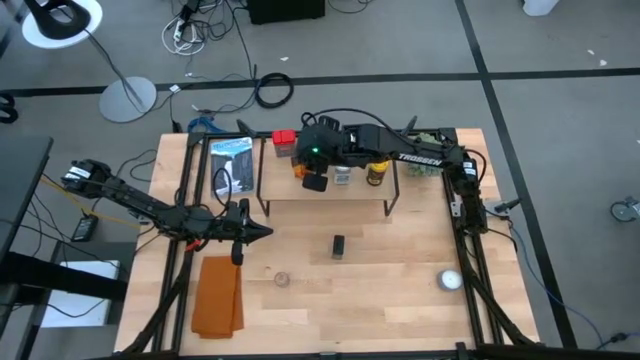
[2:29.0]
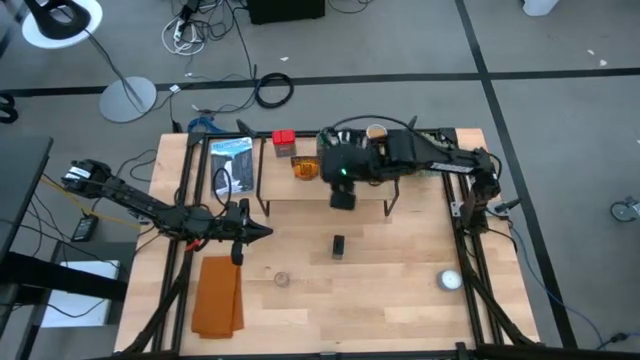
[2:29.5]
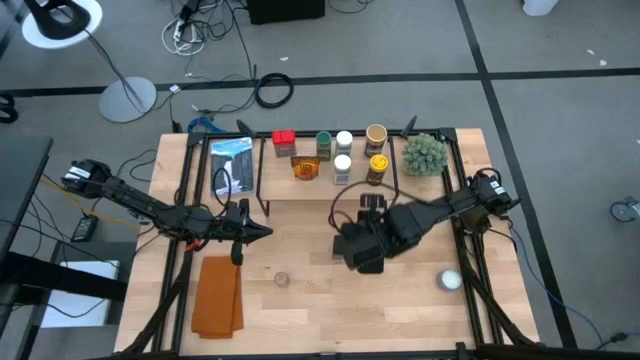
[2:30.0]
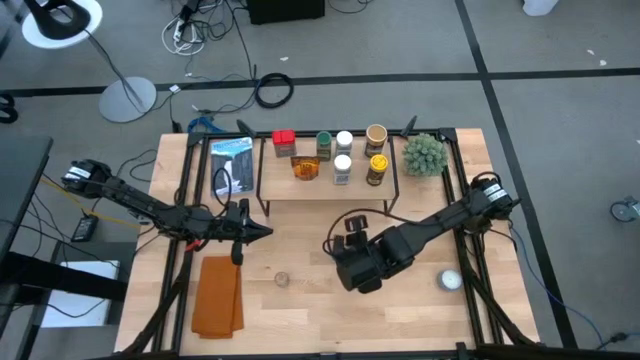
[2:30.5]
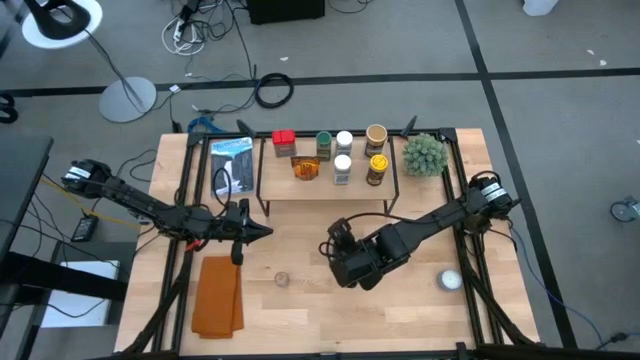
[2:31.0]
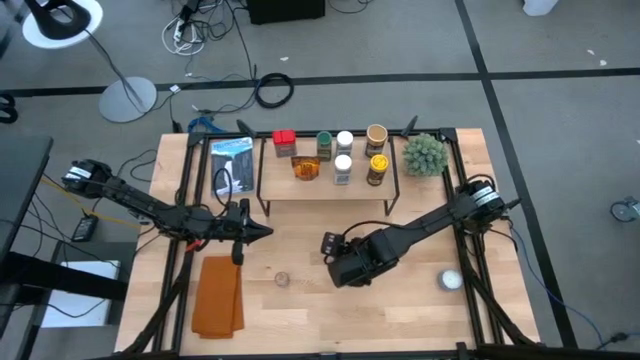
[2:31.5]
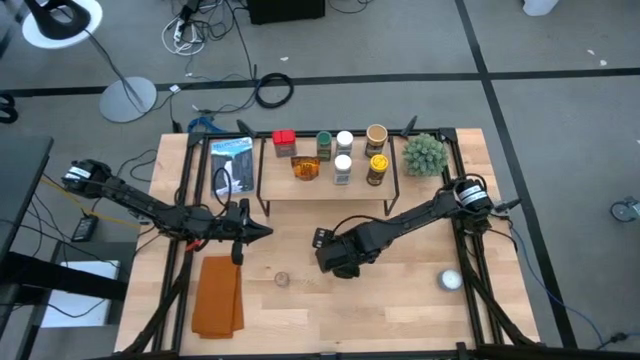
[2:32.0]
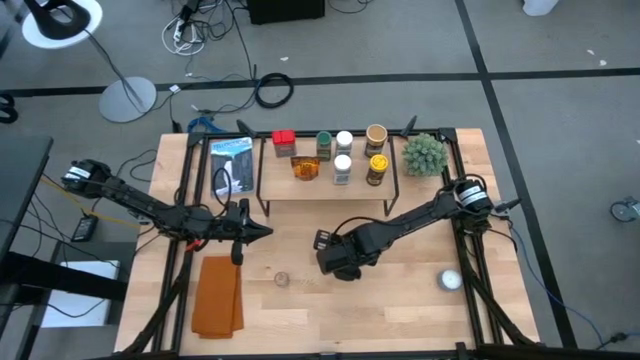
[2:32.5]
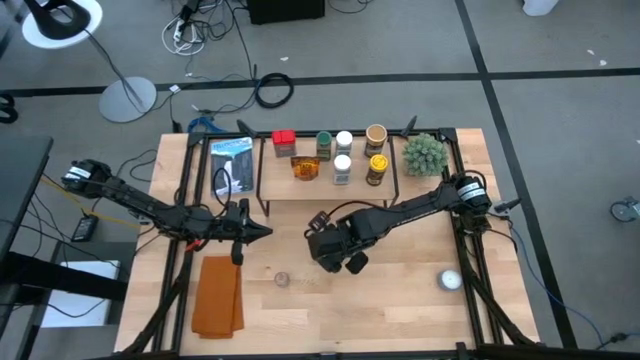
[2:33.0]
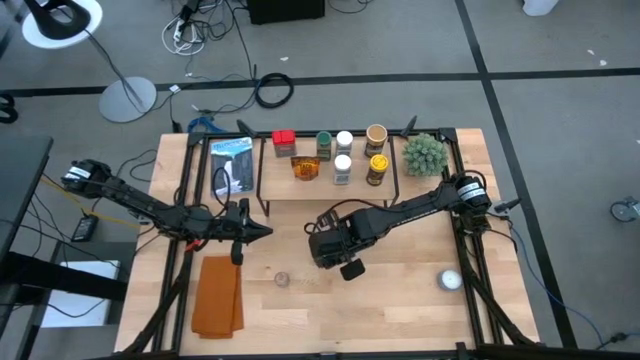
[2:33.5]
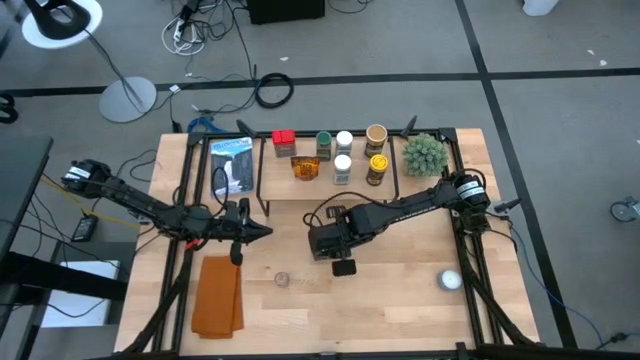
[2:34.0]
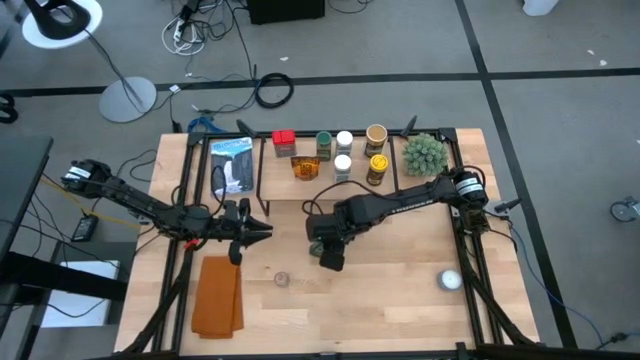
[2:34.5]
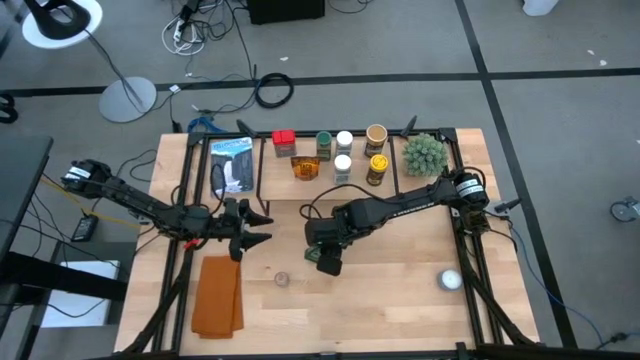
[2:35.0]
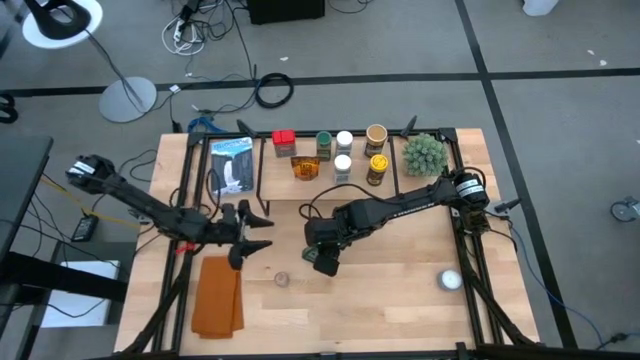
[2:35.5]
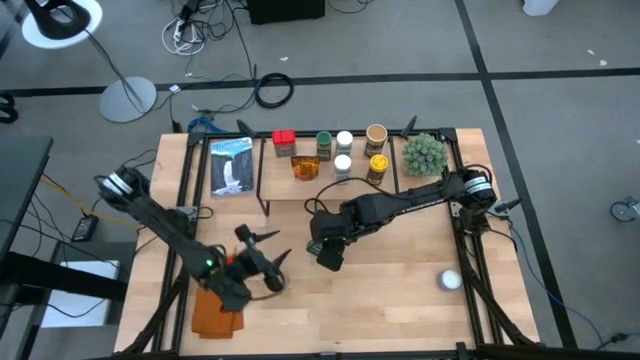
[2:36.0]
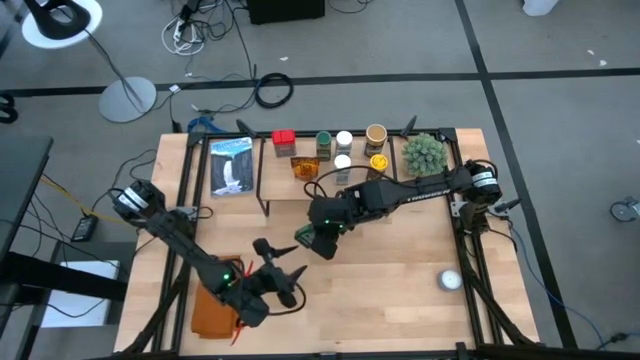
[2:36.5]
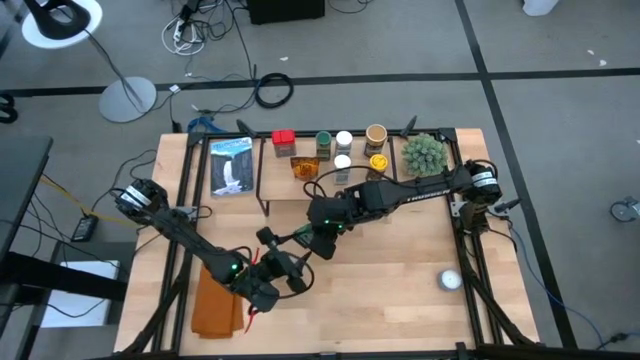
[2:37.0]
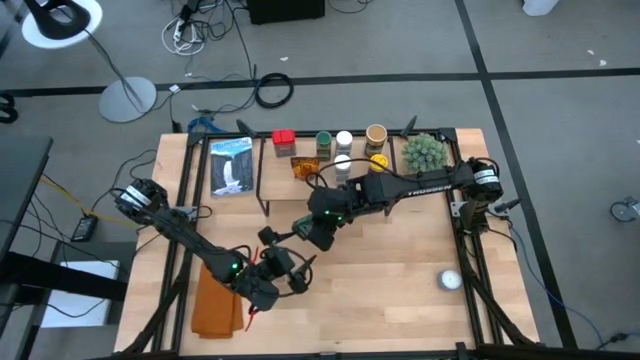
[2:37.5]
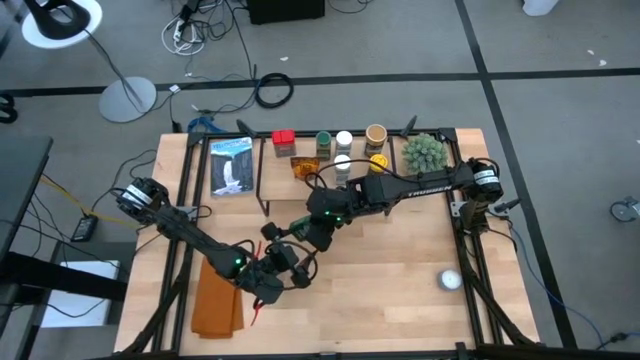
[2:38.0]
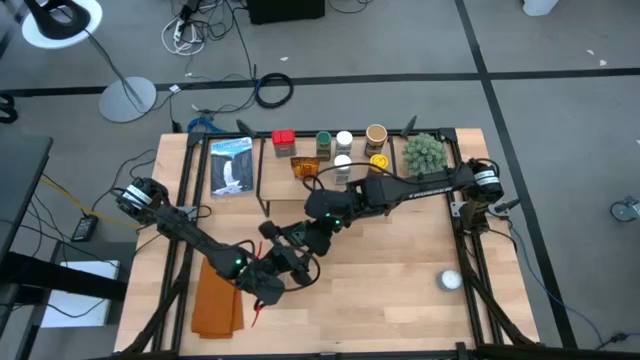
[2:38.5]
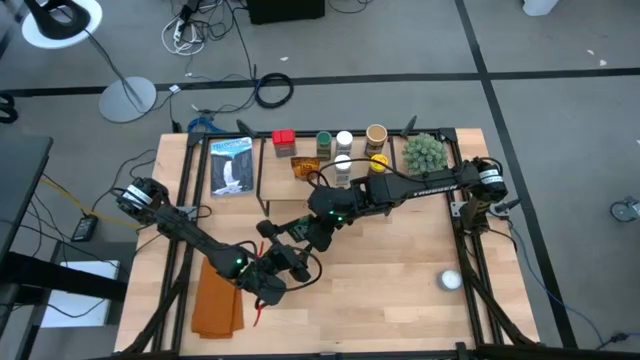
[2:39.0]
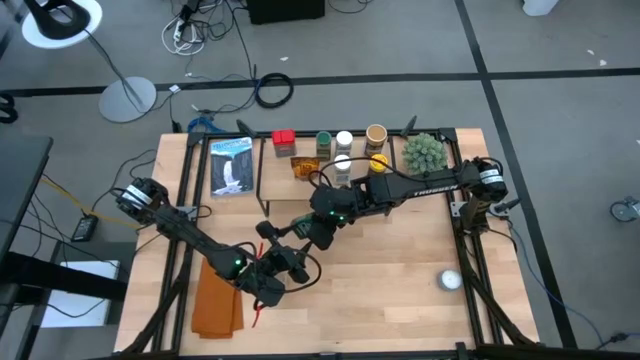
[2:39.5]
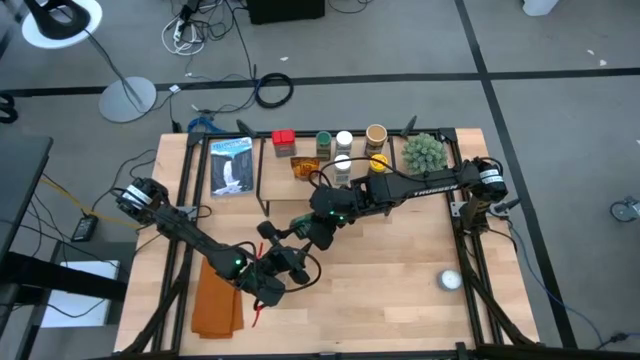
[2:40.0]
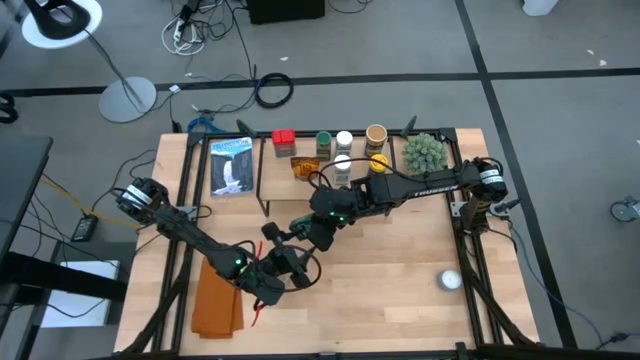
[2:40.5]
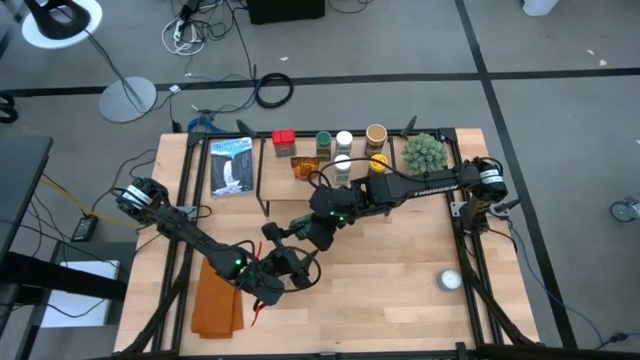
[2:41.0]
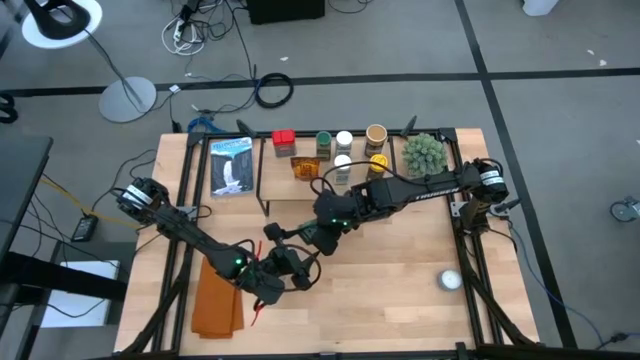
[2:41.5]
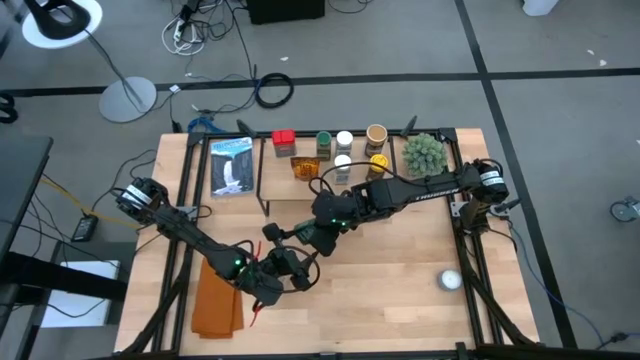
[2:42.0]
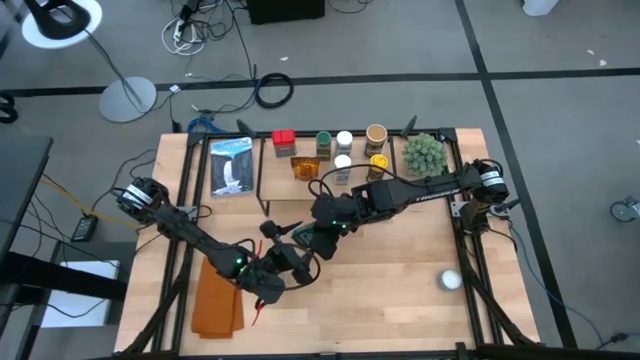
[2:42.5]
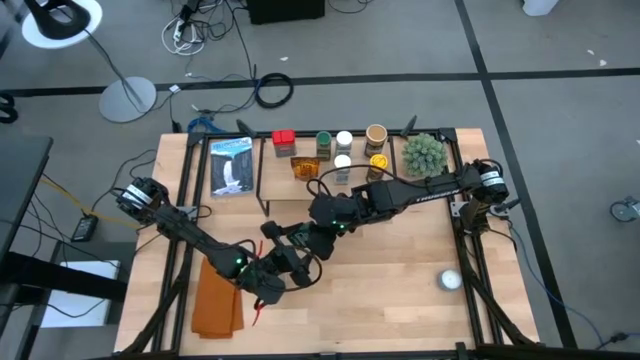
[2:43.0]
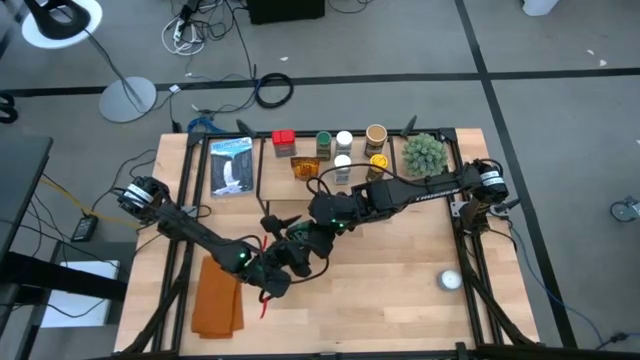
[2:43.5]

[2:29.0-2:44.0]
Task: Shelf spices
Put the black seasoning can on the shelf

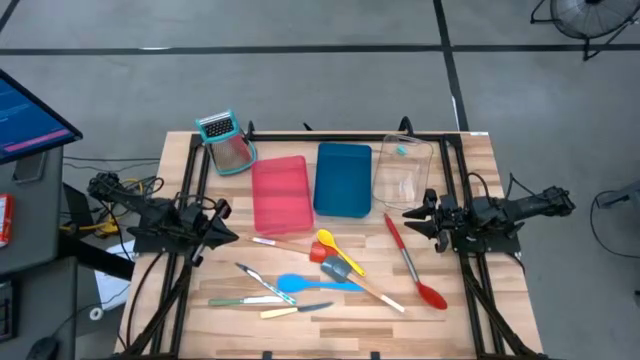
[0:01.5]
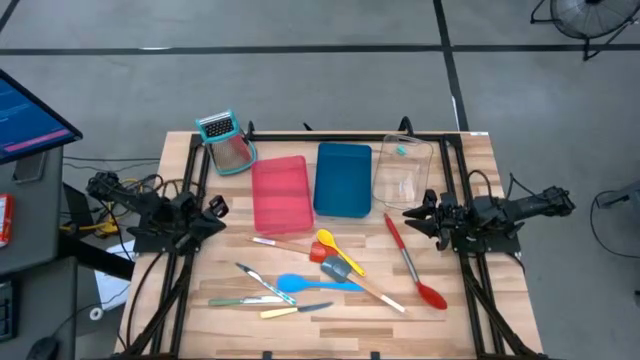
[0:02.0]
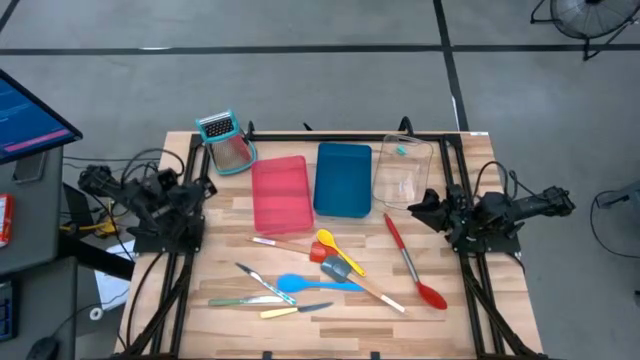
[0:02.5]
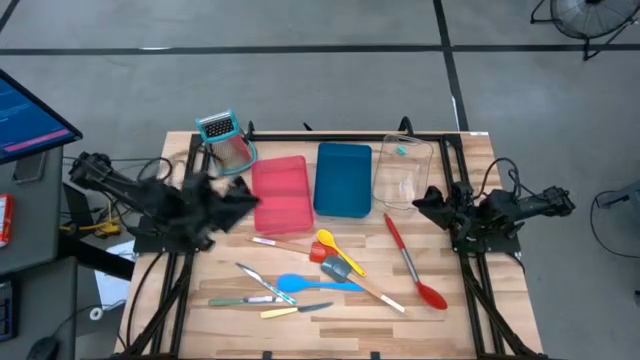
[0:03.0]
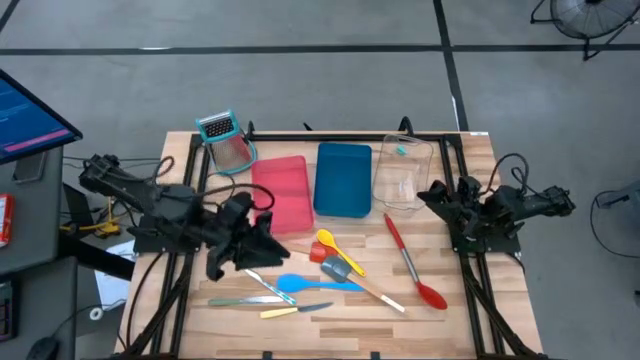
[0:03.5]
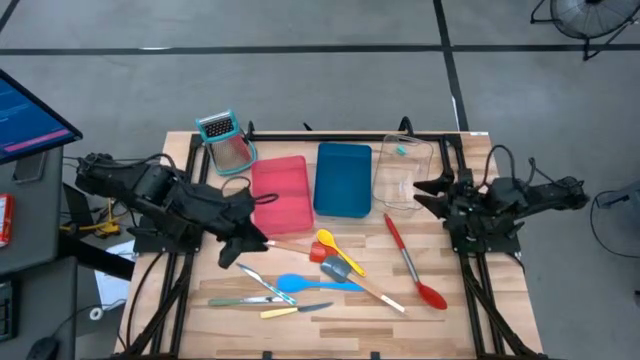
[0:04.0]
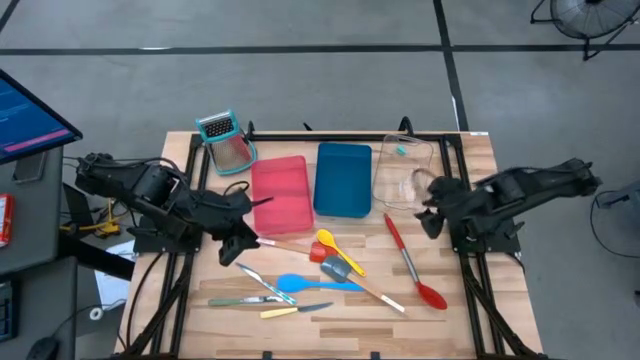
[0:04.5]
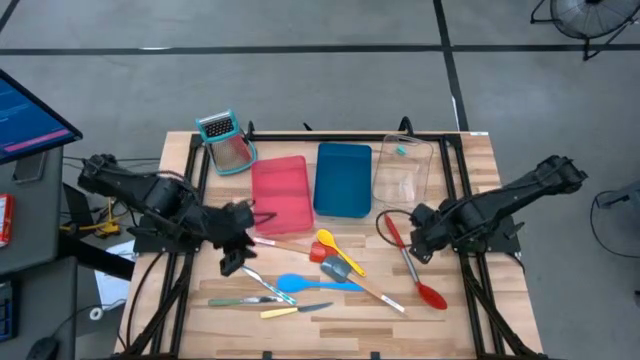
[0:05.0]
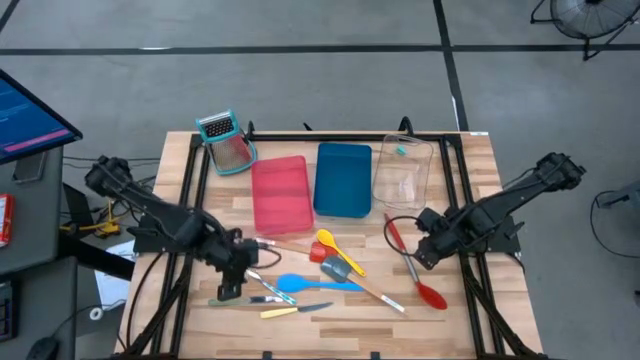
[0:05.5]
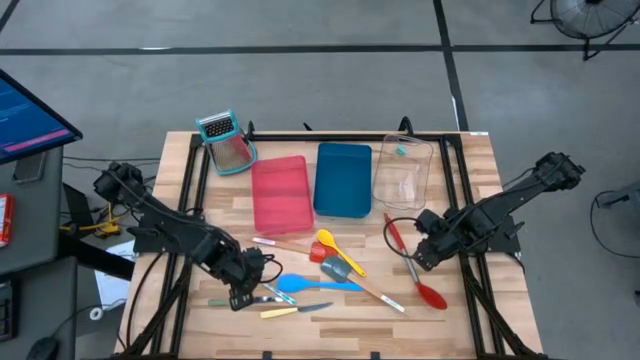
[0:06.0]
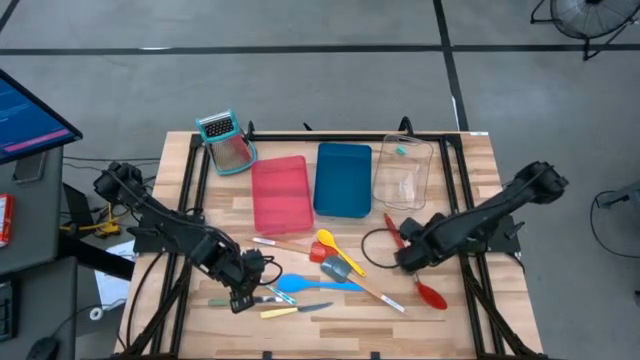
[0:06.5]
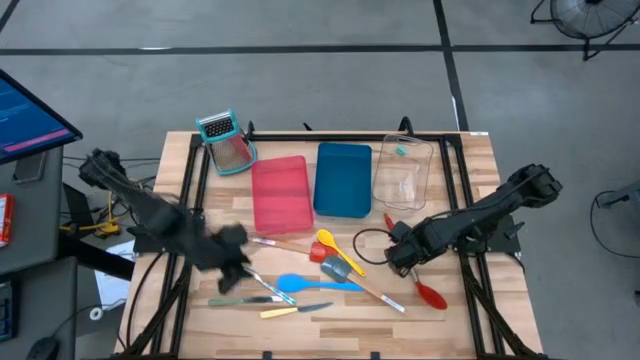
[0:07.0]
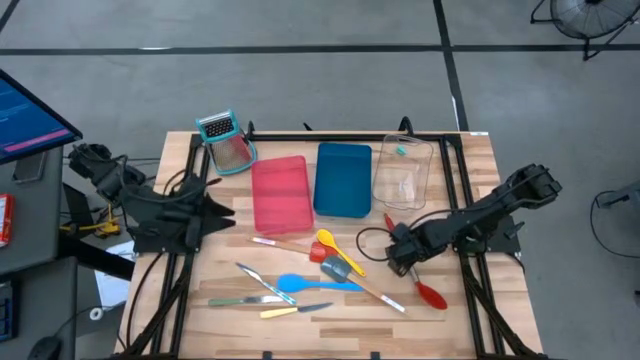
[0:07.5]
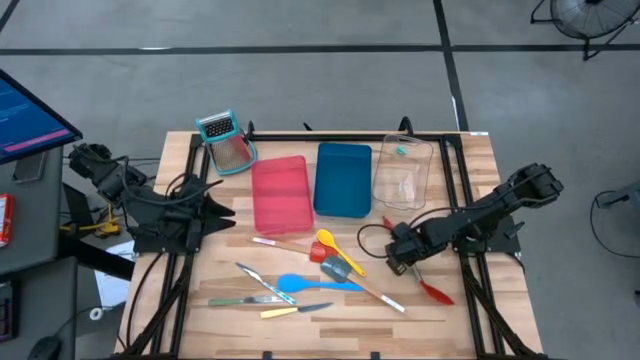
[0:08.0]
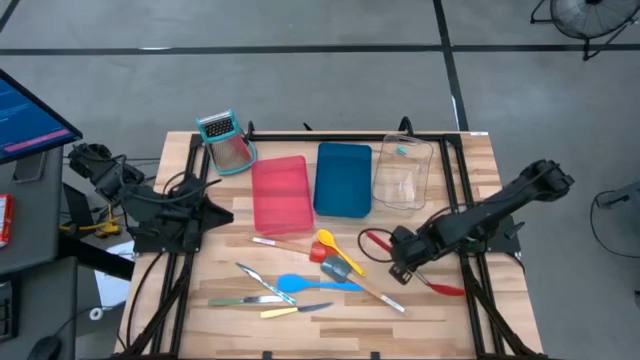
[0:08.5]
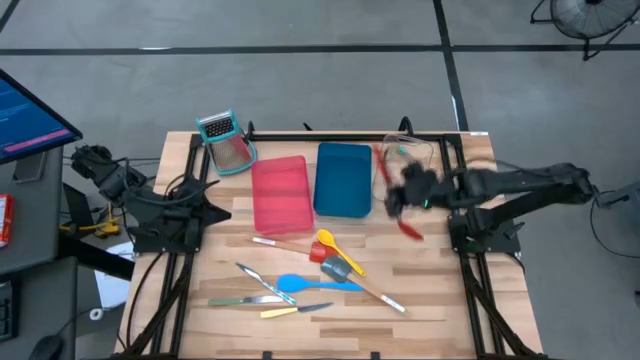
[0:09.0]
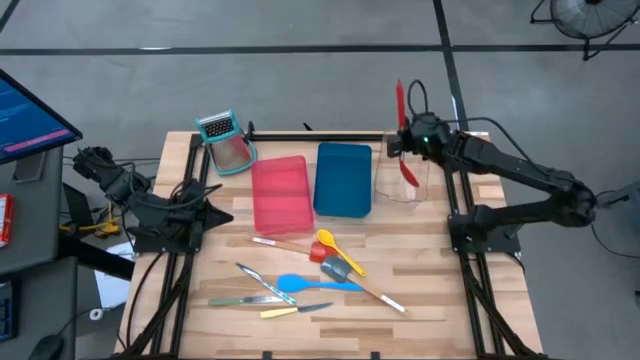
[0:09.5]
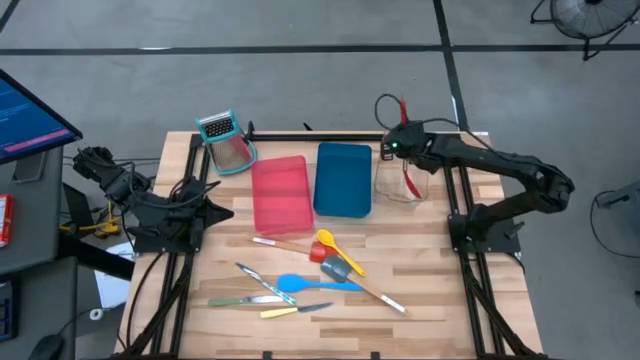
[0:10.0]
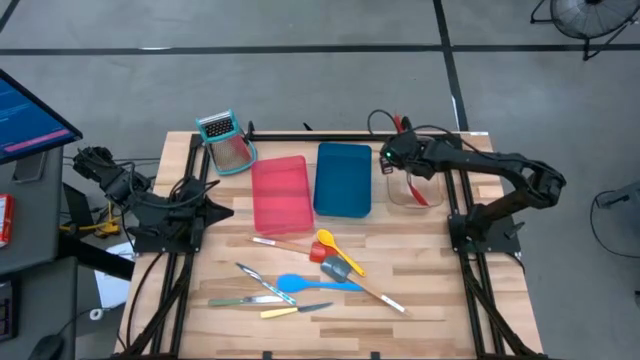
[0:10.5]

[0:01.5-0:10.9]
Task: Pick & Place Kitchen Items
Put the red serving spoon into the transparent bin
